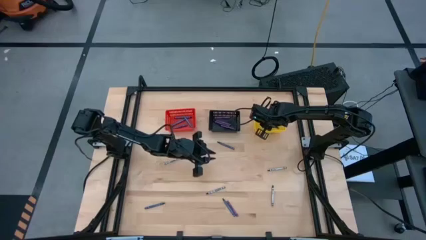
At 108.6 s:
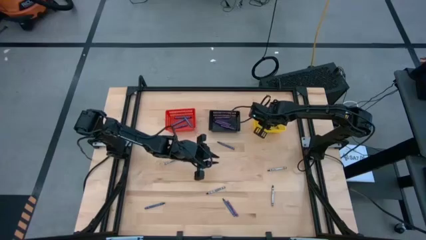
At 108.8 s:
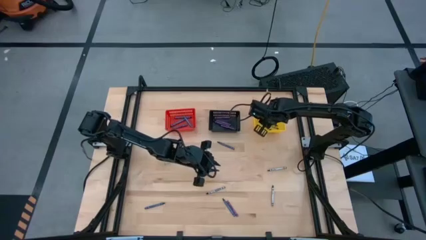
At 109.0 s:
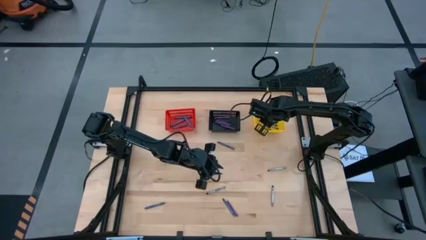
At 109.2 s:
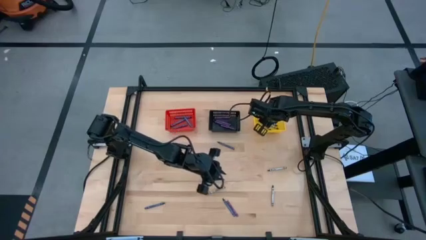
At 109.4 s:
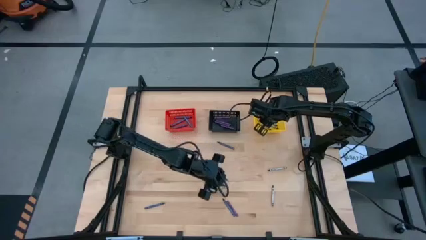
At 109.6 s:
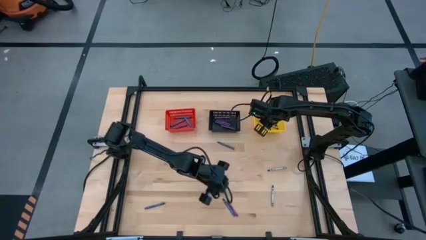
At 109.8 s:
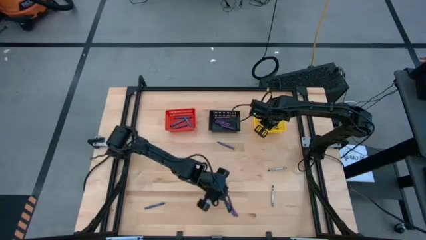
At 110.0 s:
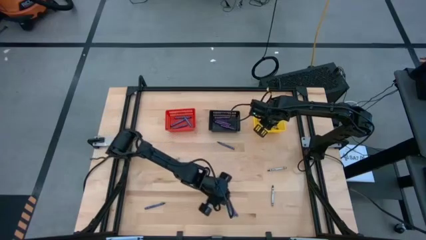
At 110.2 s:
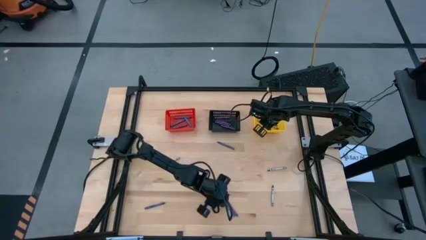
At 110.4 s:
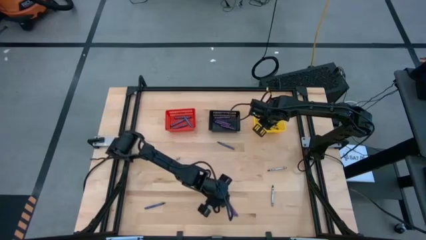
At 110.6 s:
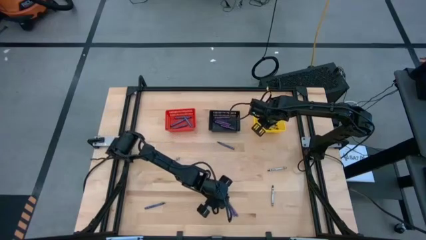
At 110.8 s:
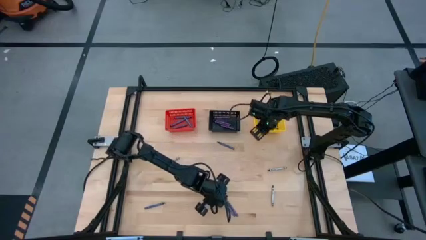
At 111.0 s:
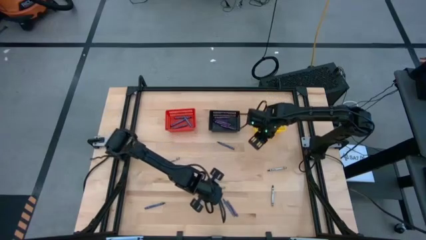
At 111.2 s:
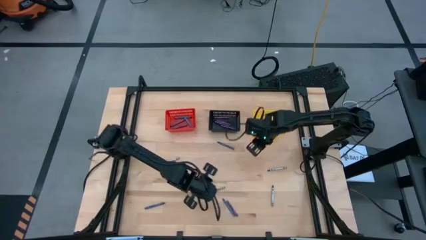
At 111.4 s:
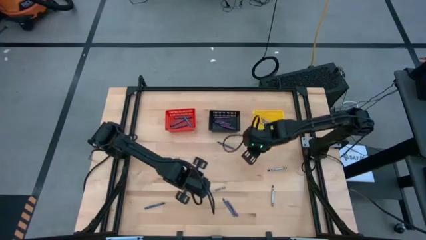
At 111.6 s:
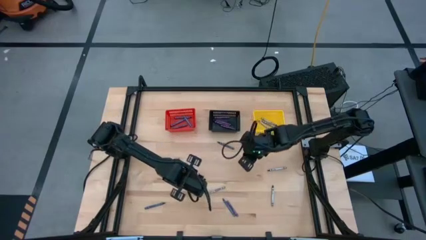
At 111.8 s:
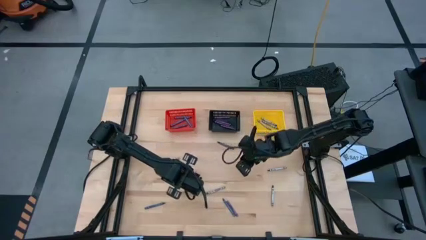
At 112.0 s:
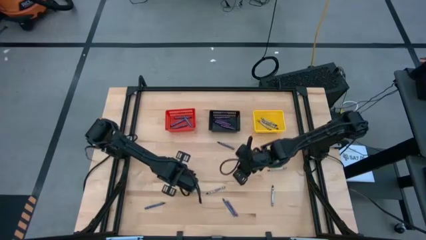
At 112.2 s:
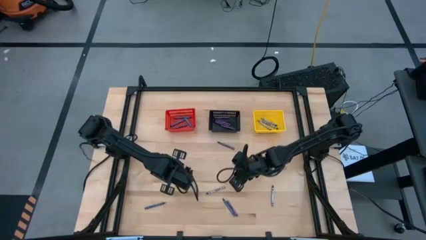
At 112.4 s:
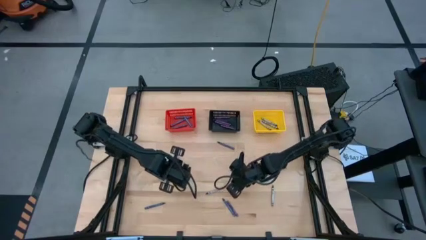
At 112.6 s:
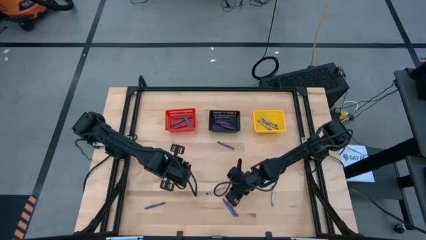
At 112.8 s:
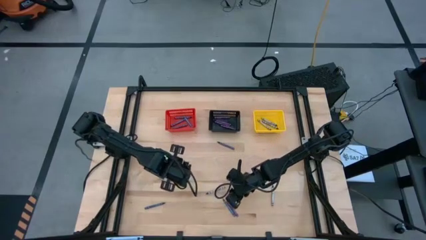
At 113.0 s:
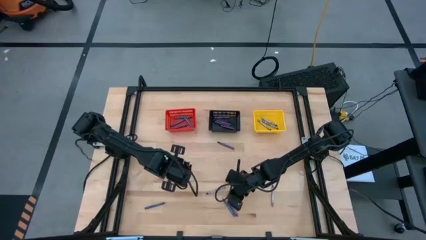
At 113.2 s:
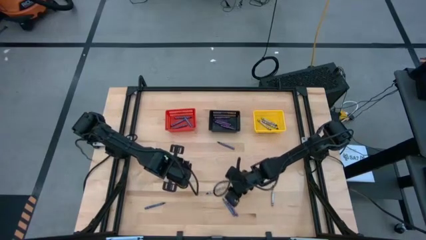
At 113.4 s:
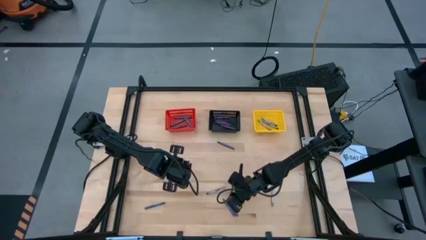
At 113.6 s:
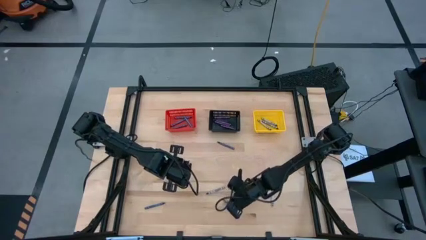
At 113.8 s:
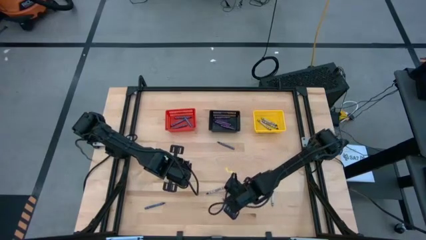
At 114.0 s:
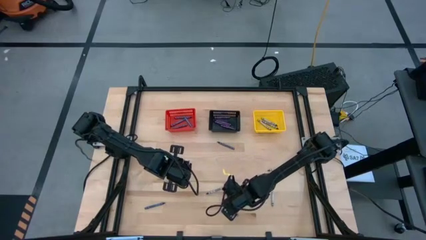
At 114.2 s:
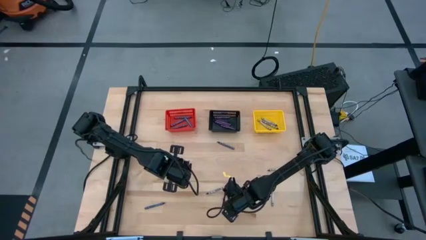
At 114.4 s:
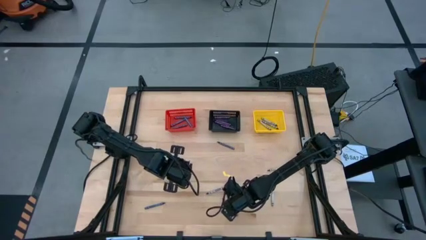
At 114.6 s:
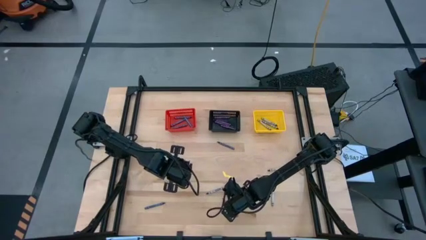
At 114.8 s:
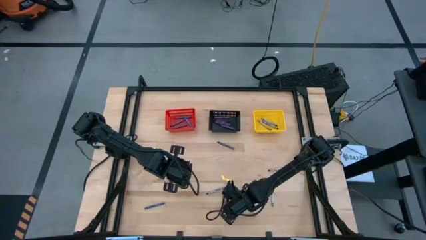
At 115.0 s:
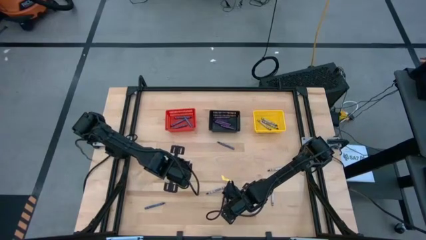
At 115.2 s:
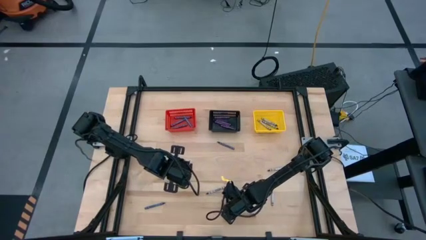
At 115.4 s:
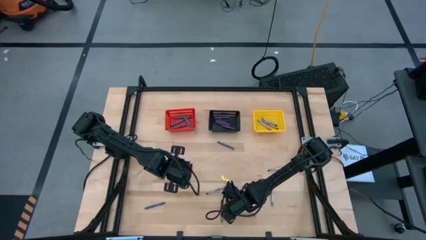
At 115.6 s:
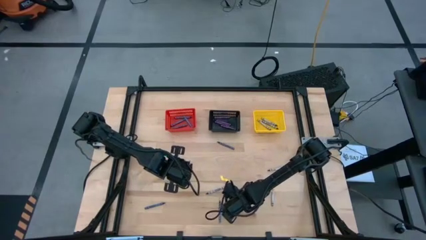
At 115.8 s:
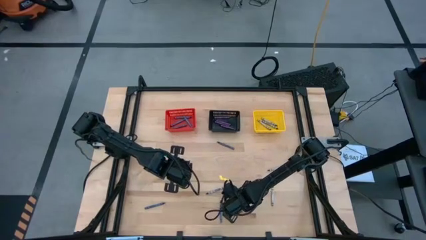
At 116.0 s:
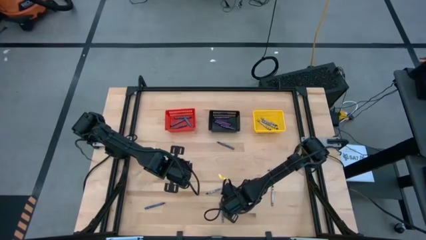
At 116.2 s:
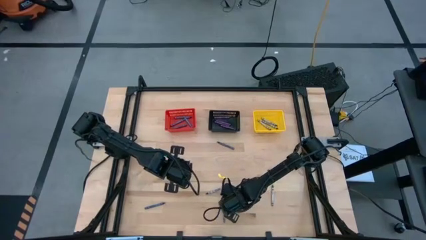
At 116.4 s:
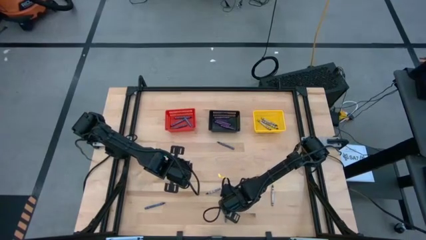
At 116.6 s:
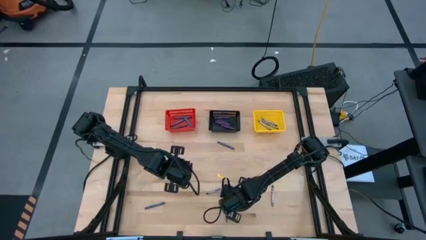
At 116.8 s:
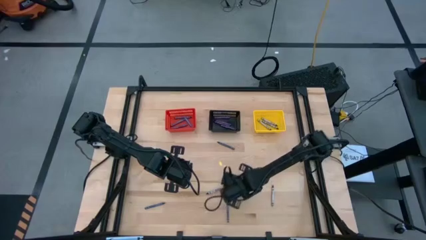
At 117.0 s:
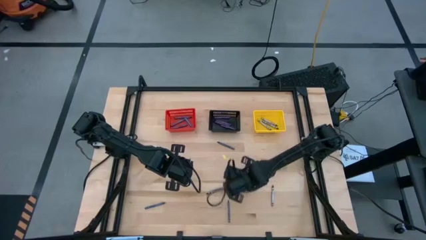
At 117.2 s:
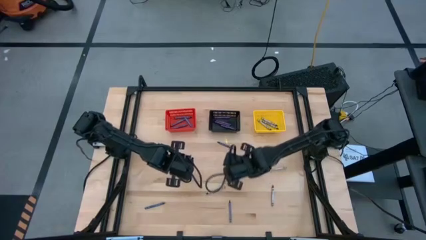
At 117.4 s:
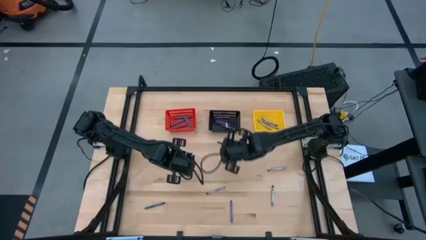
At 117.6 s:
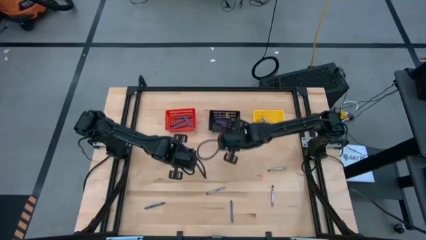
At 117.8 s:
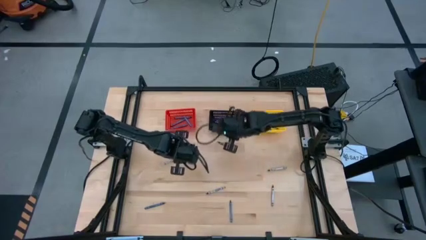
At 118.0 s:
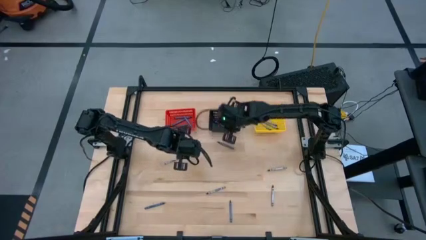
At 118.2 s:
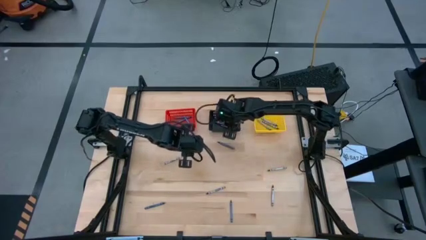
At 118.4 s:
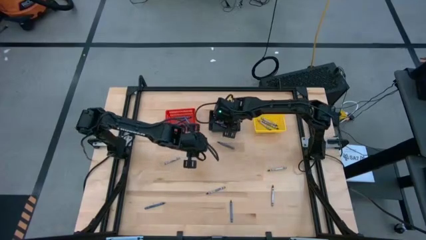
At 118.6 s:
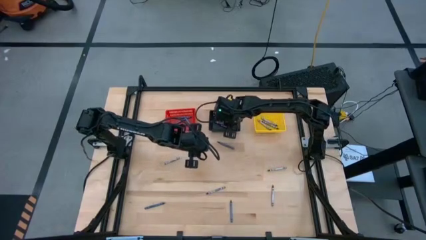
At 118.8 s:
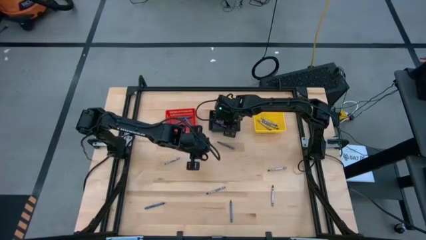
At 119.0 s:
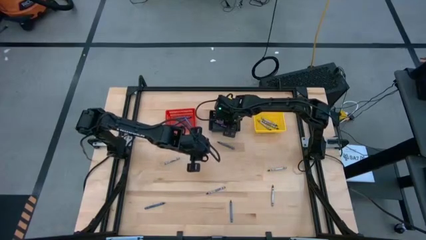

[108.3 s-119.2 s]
Task: Sort crayons
Put the violet crayon into the black bin

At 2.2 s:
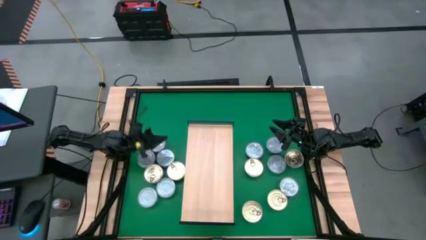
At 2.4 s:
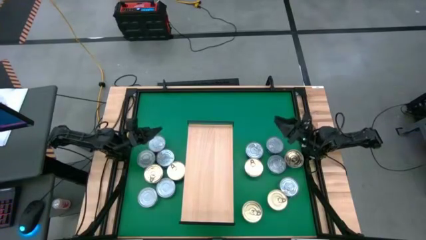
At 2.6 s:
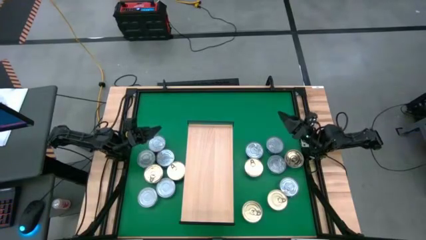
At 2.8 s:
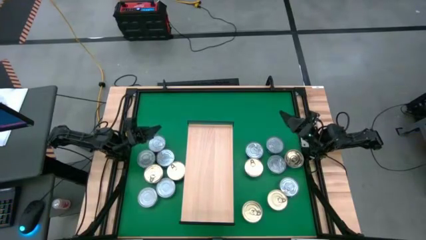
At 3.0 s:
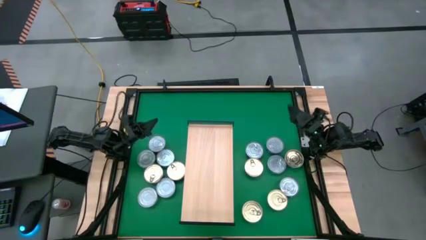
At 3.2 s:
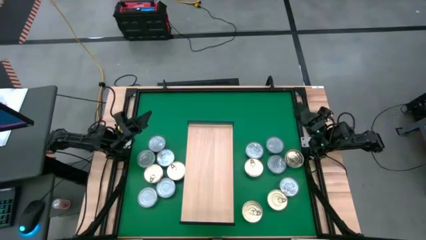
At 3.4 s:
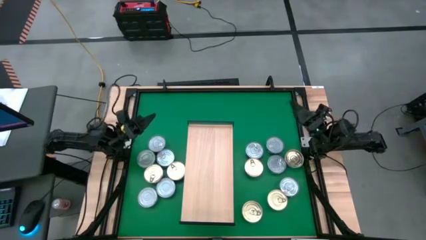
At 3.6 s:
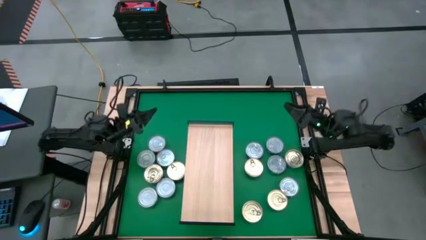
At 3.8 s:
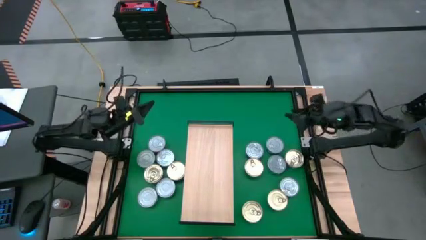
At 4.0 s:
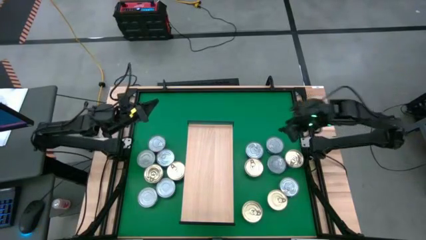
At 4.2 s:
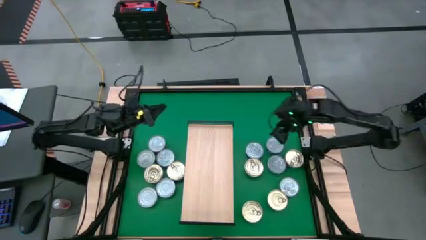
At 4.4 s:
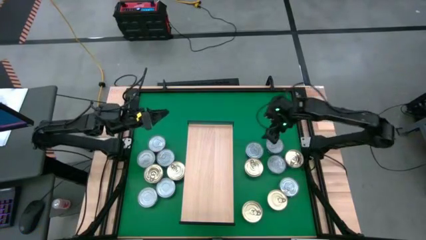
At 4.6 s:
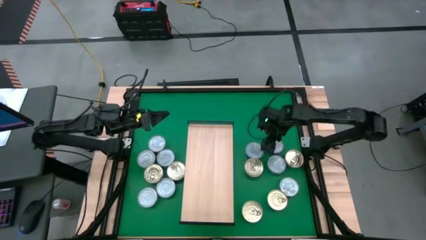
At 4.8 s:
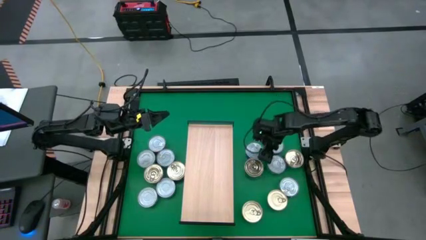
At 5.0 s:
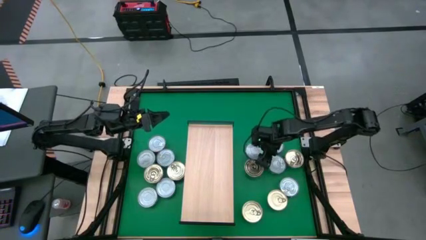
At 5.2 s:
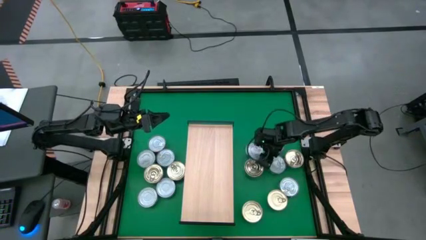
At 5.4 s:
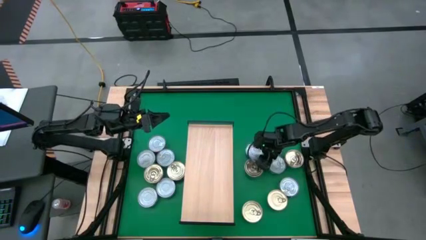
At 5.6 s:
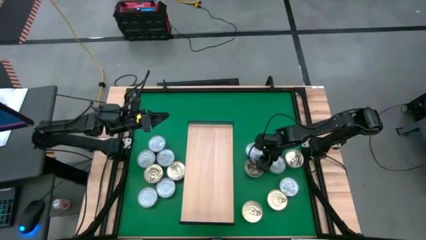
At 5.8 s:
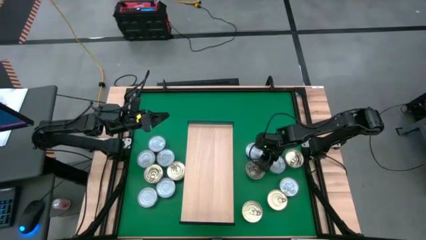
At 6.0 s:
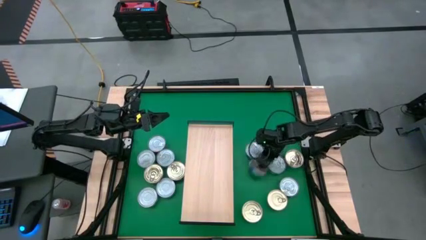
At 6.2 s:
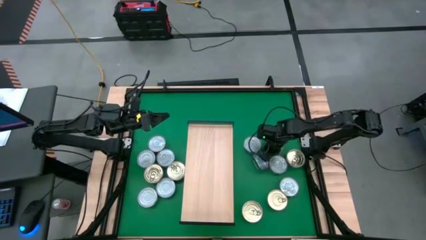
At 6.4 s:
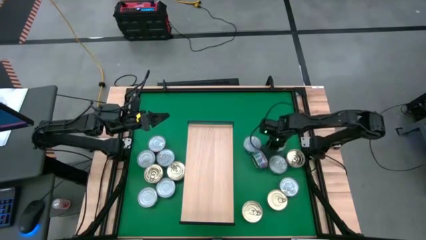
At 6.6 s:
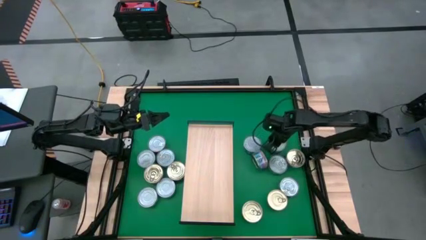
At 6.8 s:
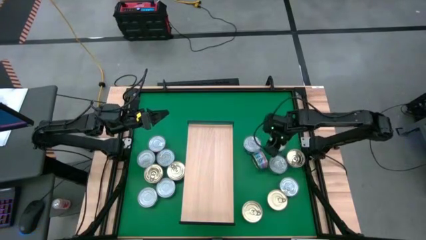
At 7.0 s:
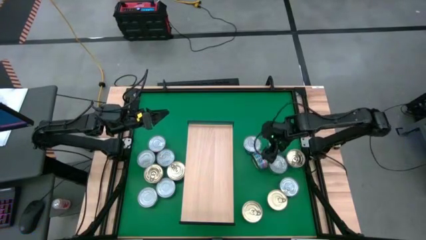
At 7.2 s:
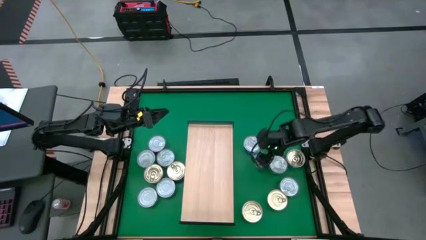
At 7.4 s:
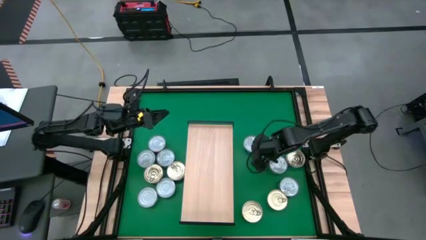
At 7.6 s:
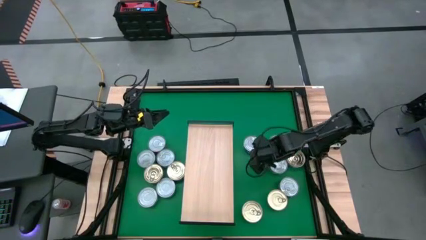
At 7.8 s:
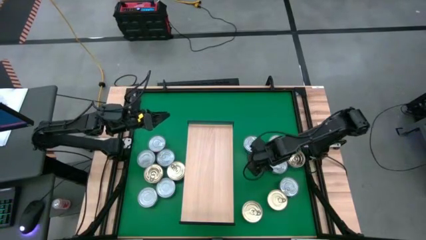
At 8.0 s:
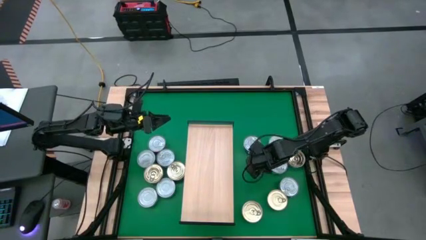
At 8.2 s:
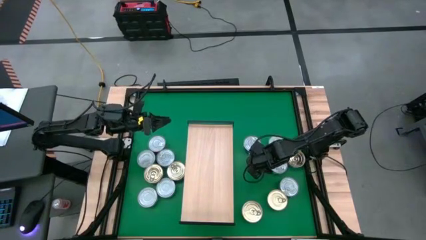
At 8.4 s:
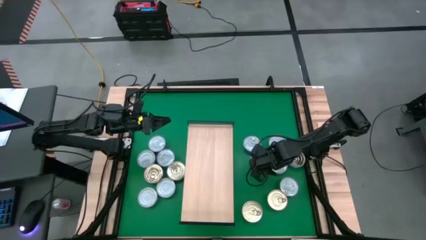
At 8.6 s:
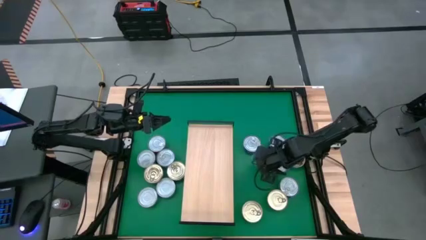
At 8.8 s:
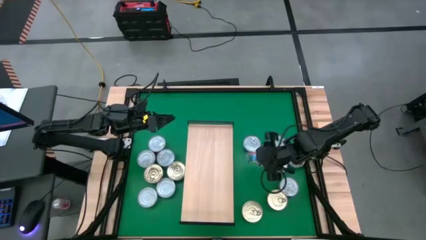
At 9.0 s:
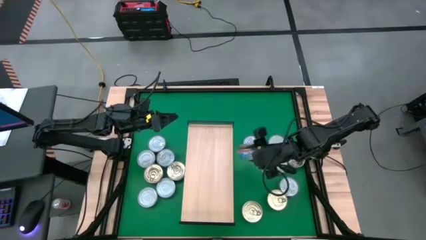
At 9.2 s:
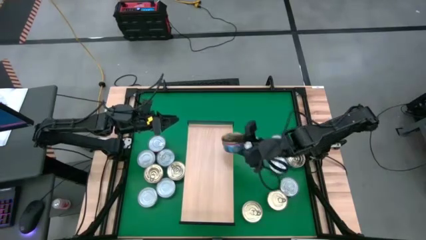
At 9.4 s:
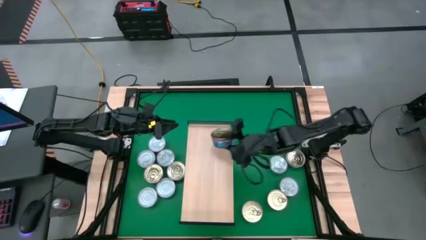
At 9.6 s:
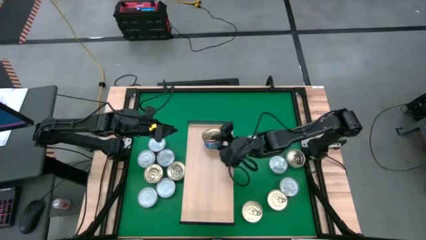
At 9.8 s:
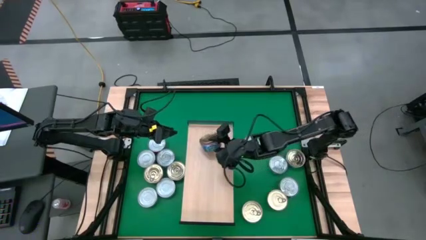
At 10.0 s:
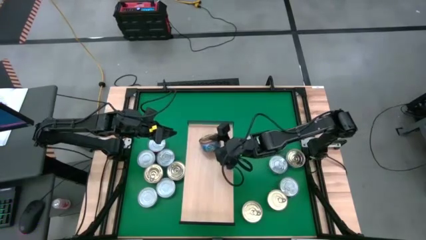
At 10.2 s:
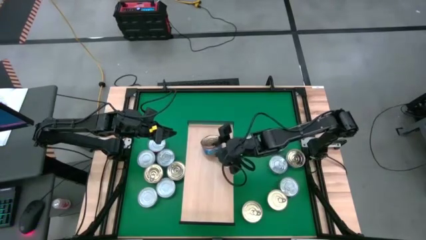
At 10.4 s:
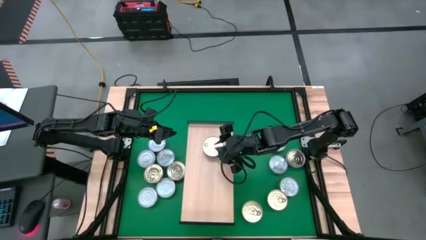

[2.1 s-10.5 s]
Task: Stack canned seafood by type on shelf
Put the blue pink tuna can on the shelf
